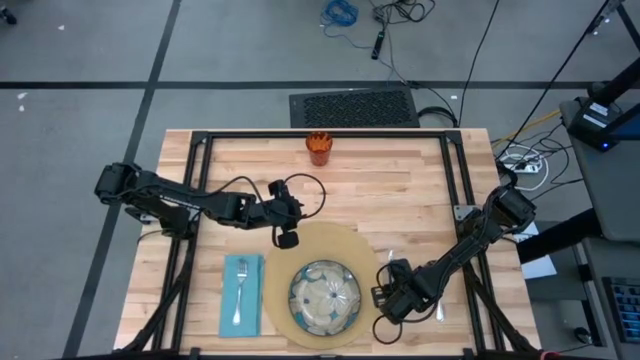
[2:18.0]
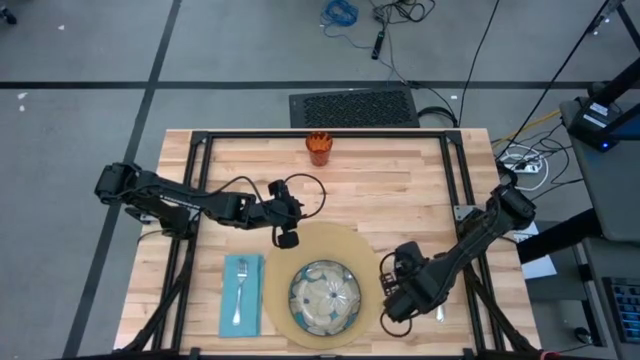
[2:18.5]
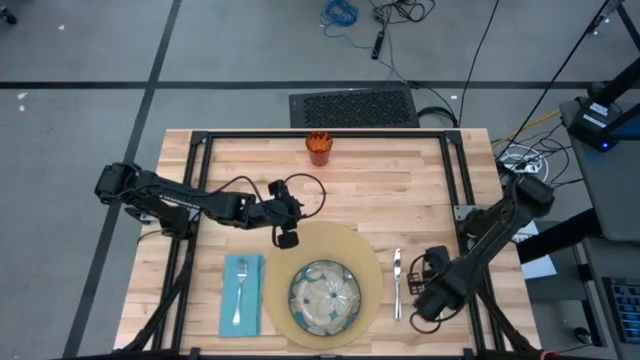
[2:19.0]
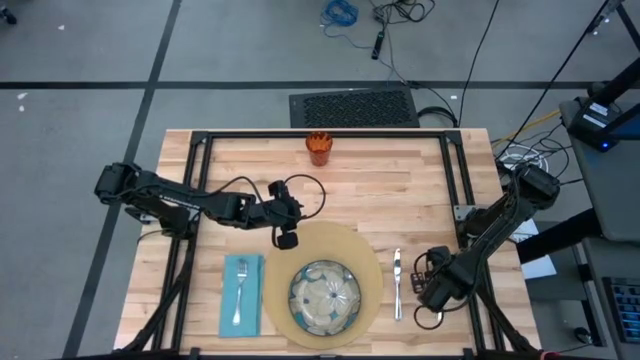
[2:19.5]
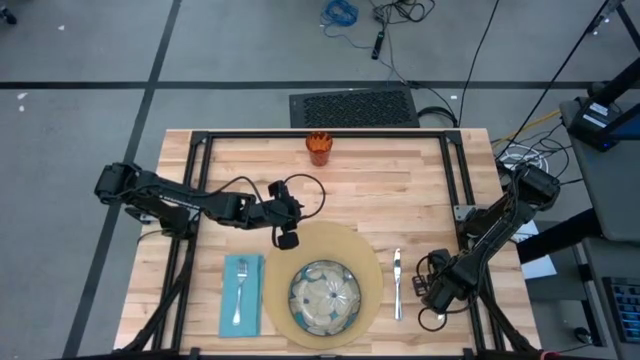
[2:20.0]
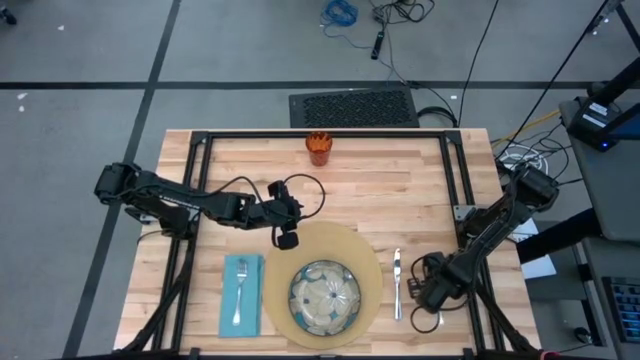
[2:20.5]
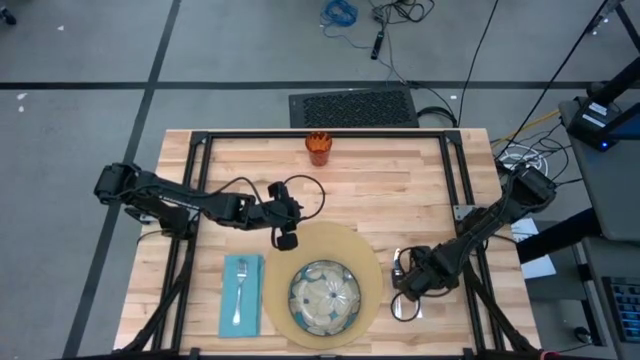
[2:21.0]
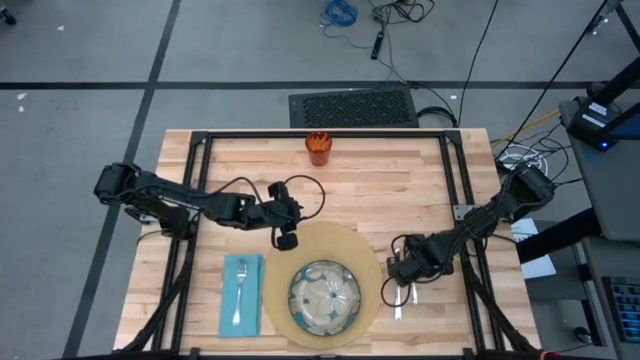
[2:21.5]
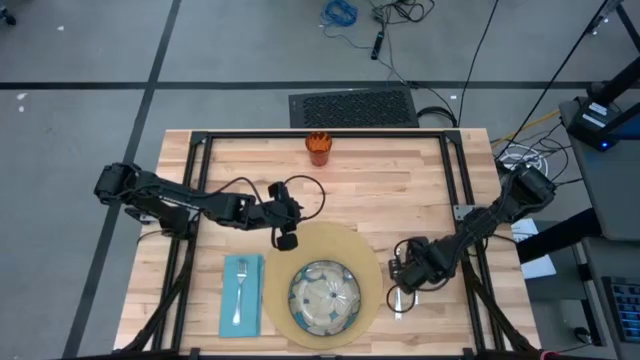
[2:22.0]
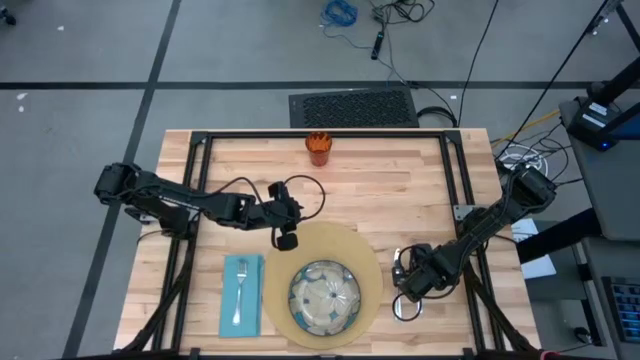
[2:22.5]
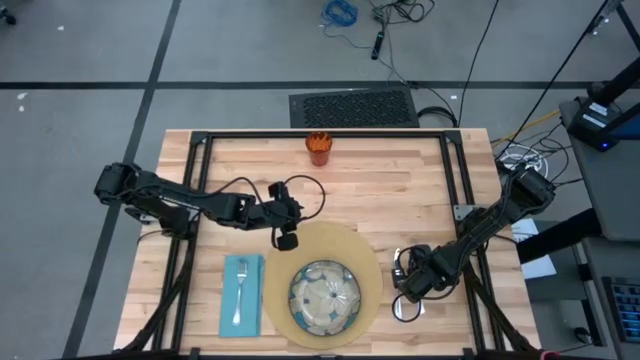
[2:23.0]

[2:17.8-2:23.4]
Task: Set table place
Put the silver spoon beside the silver fork on the table

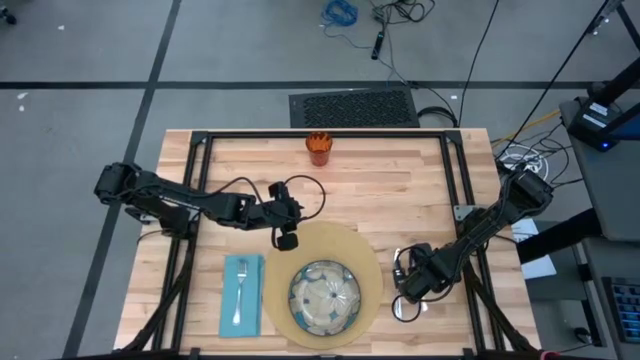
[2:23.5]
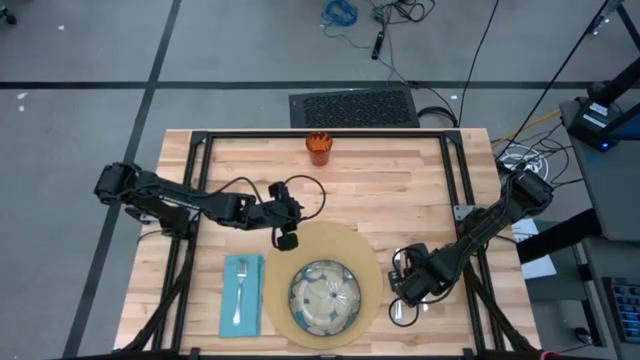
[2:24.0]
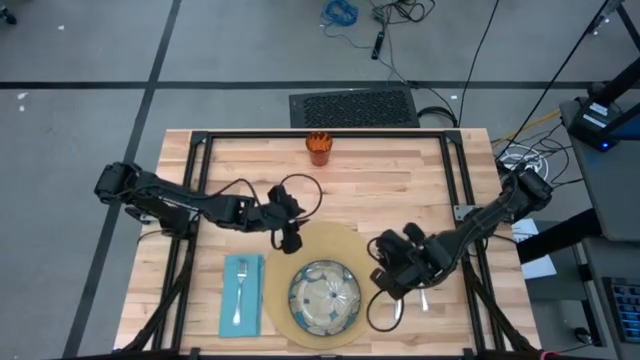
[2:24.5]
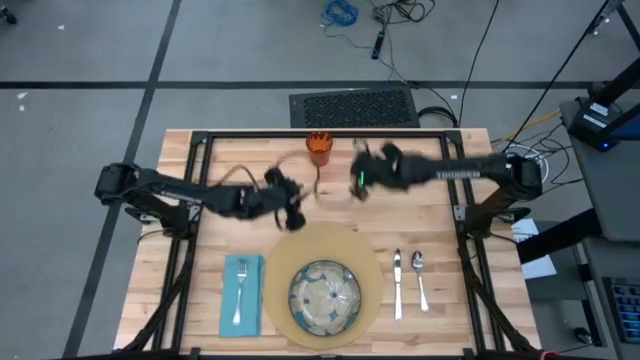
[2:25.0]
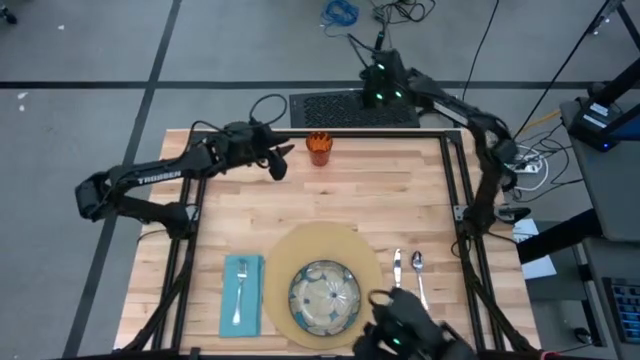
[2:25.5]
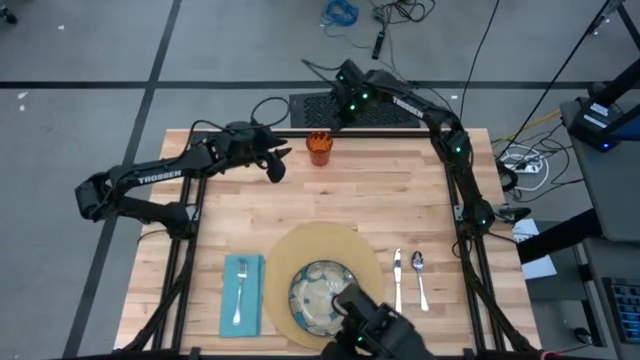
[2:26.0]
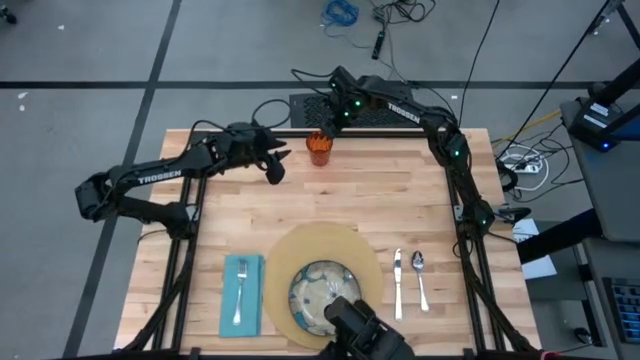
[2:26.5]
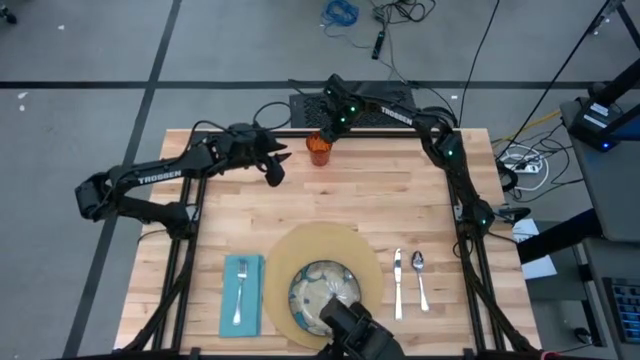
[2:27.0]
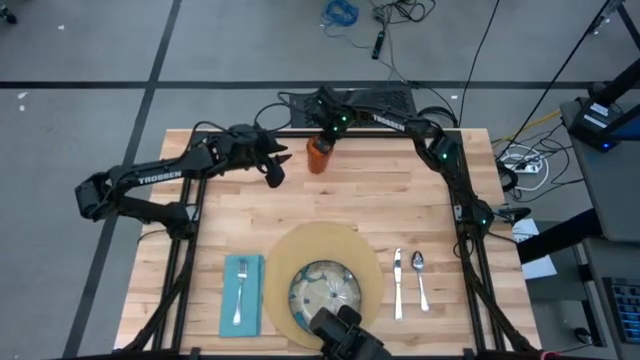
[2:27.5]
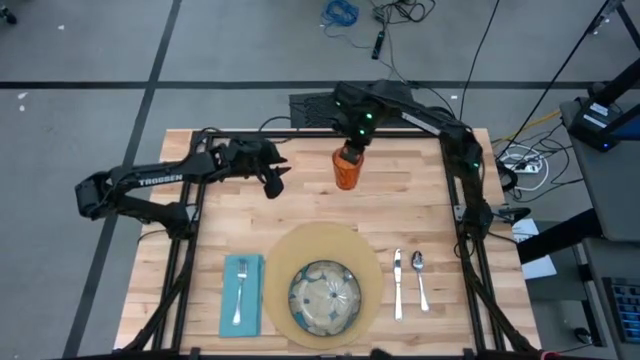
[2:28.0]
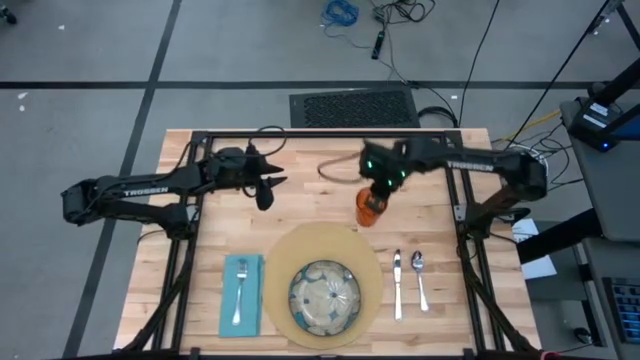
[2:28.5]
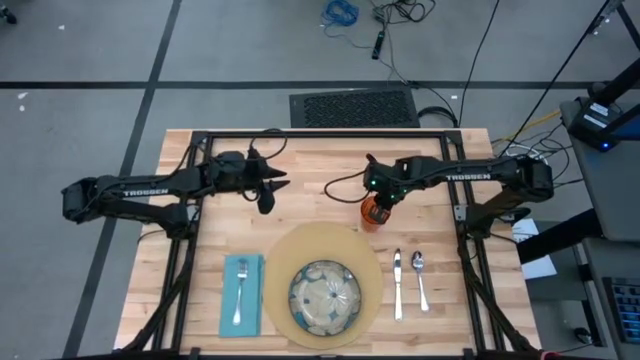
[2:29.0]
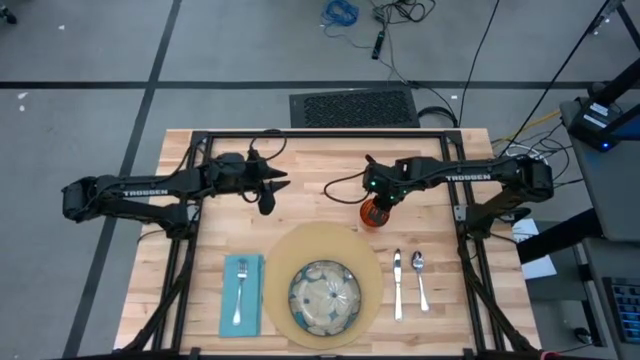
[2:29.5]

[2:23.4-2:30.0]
Put the cup on the table mat at the top right corner of the table

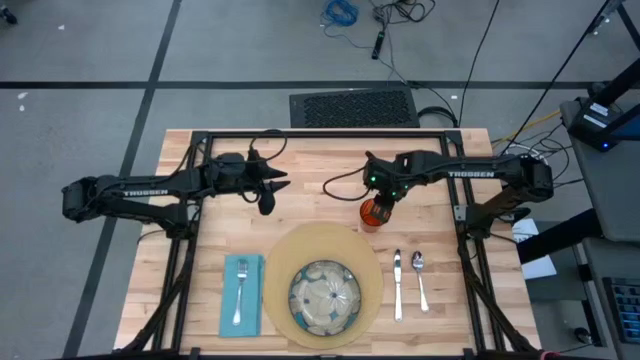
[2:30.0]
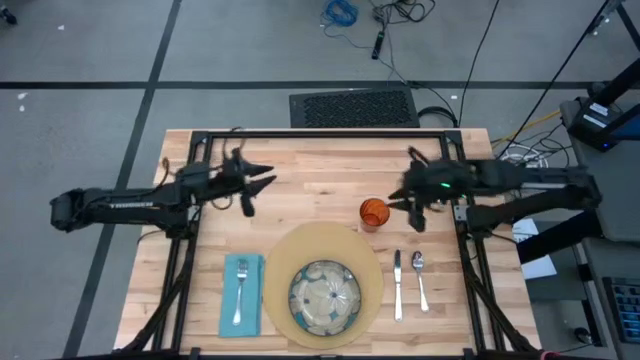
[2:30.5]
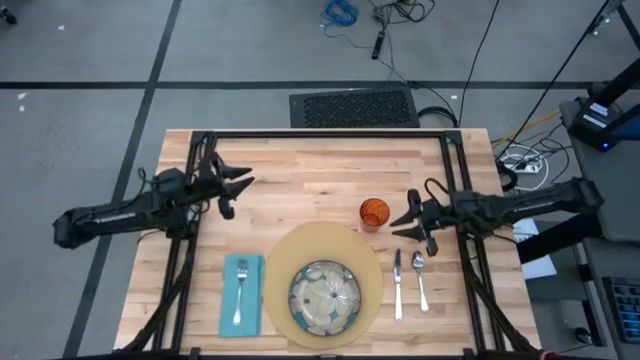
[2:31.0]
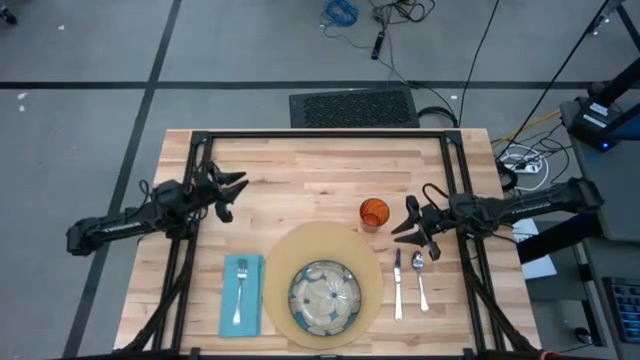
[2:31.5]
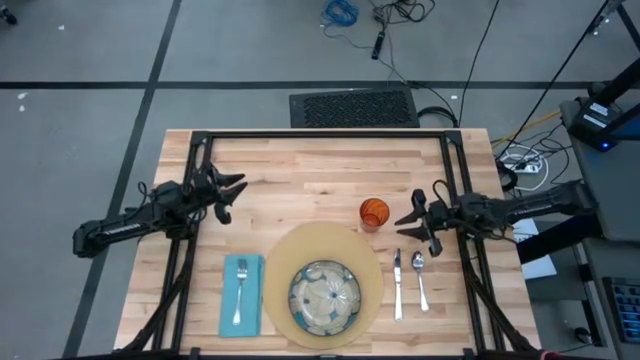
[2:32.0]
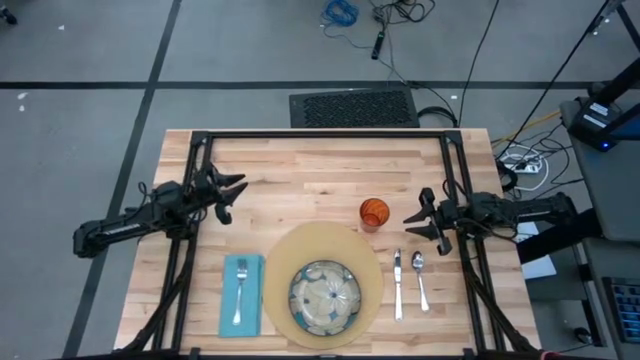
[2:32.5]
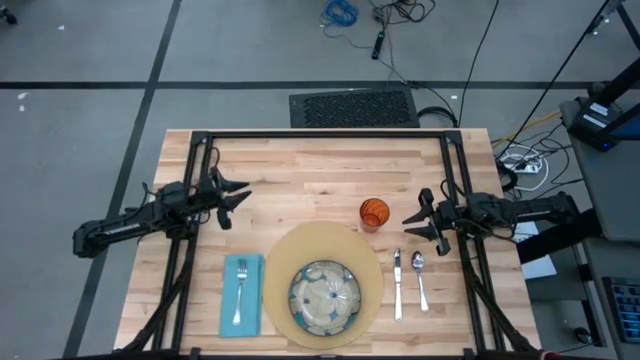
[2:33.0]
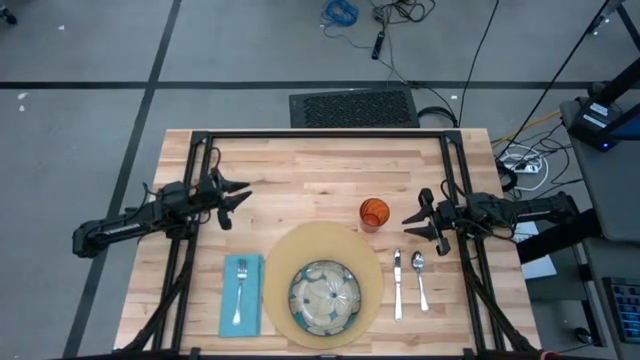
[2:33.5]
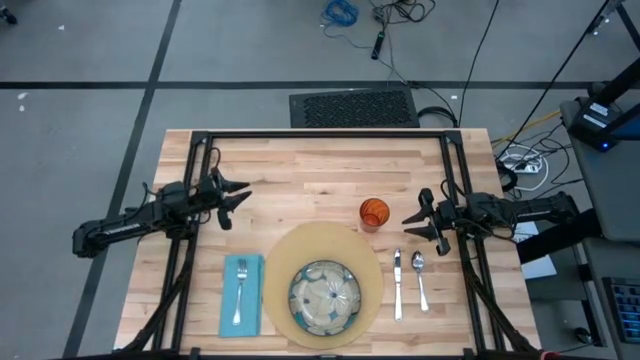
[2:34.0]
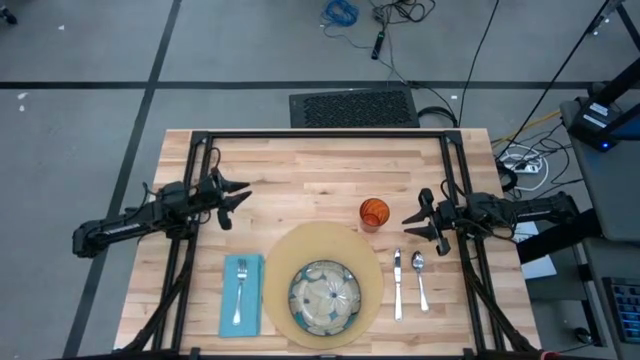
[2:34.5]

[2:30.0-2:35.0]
Return to Home Position

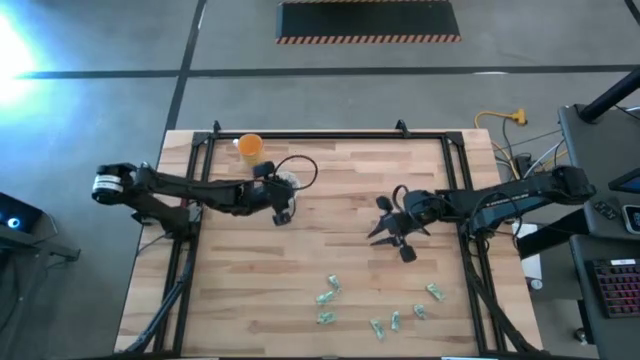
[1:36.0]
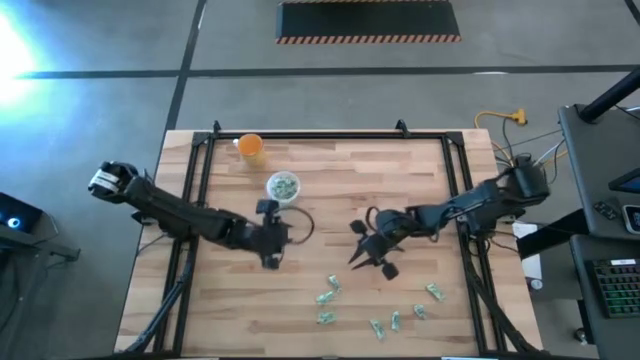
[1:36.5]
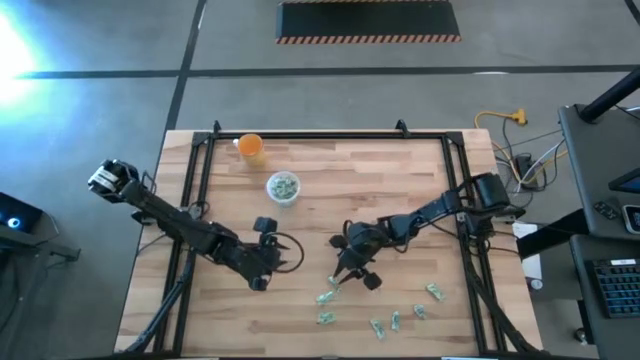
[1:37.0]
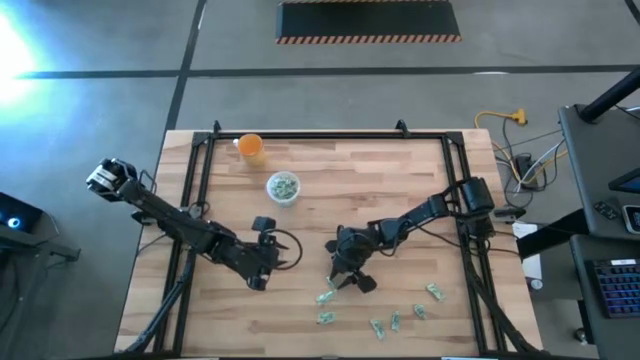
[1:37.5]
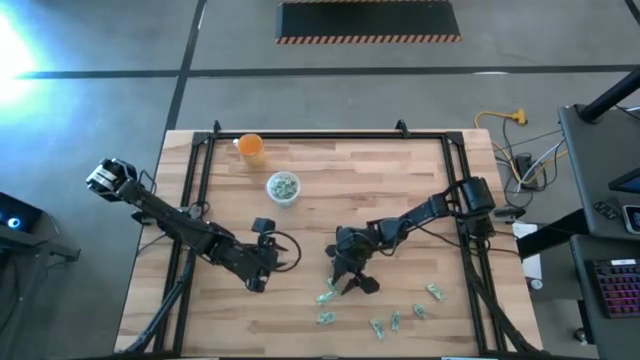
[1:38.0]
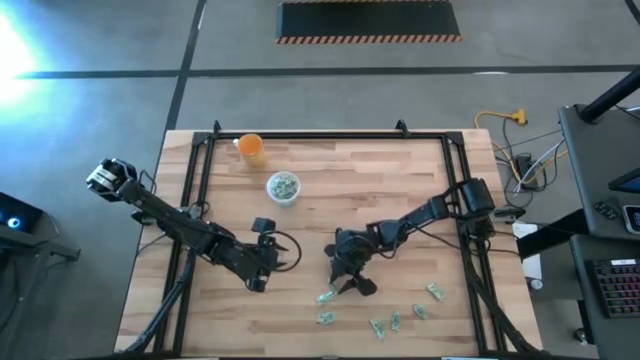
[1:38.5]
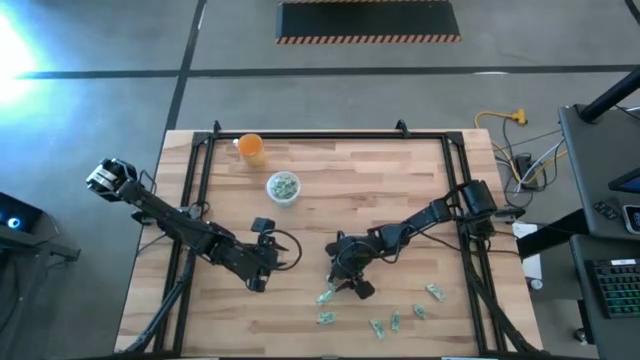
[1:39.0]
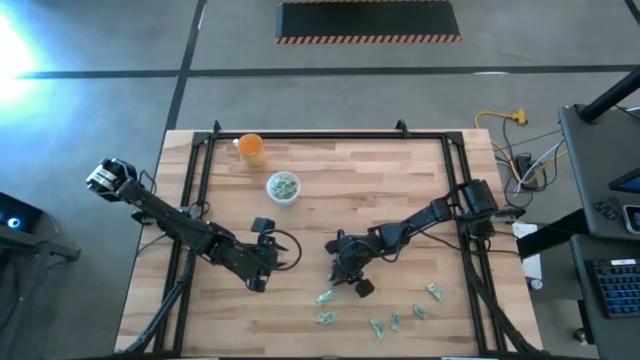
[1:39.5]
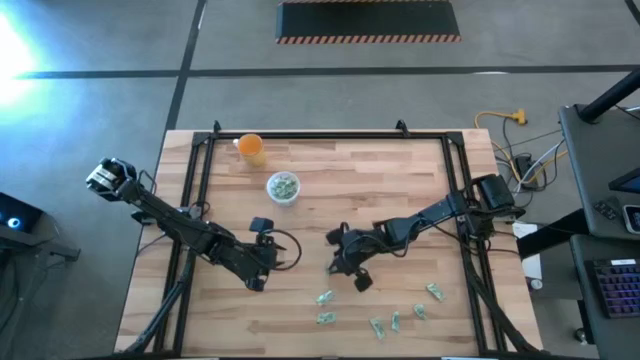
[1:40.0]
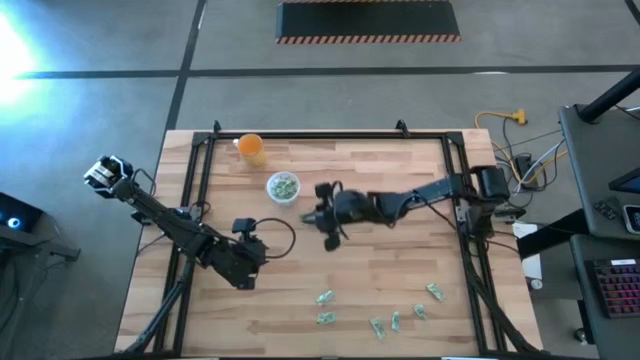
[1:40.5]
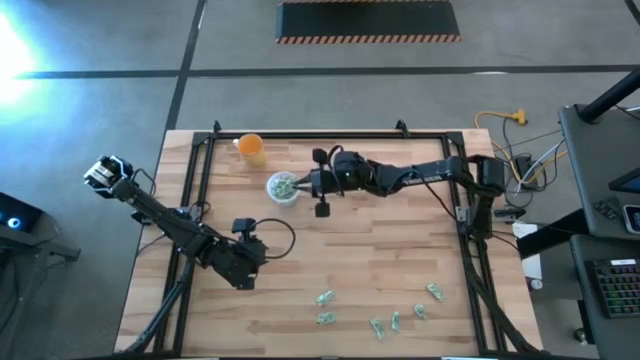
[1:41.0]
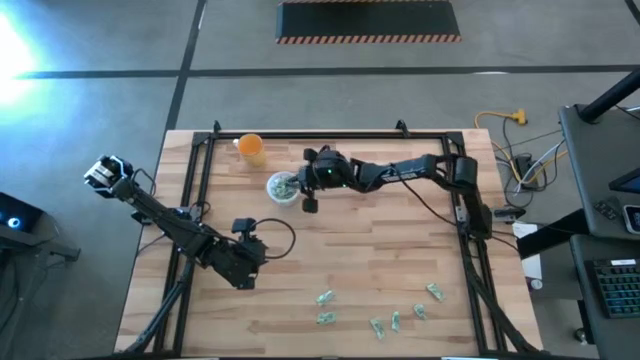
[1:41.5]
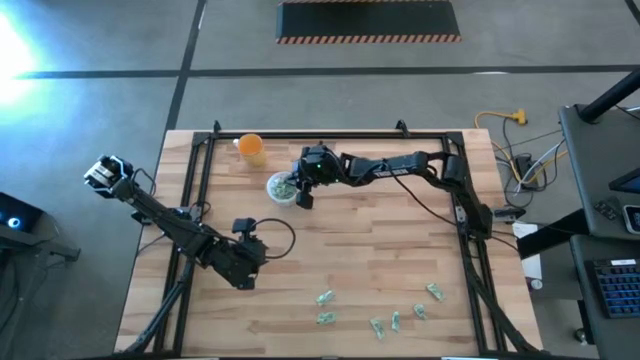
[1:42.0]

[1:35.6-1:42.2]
Task: Pick and place Stevia / Truvia into bins
Put the stevia packet into the transparent container
